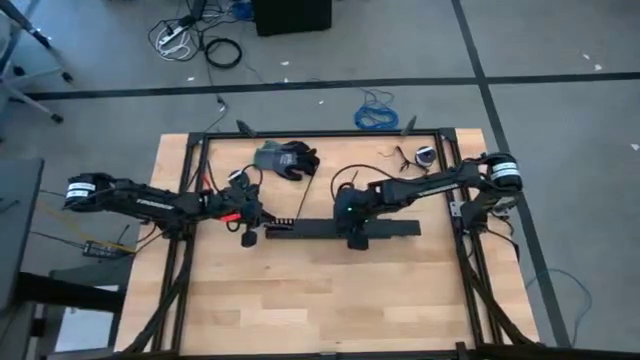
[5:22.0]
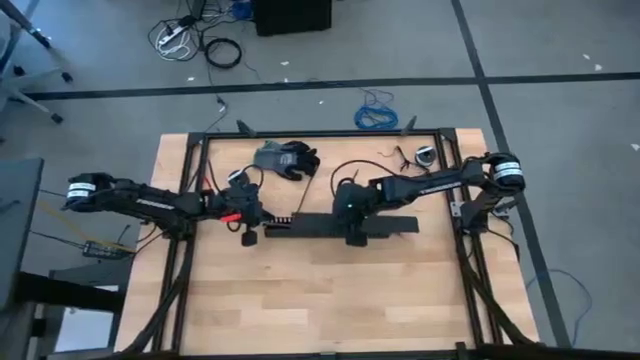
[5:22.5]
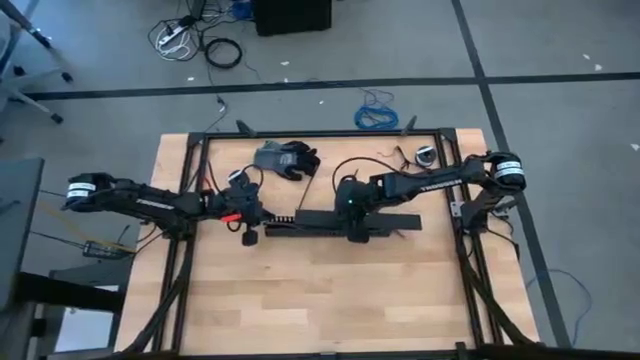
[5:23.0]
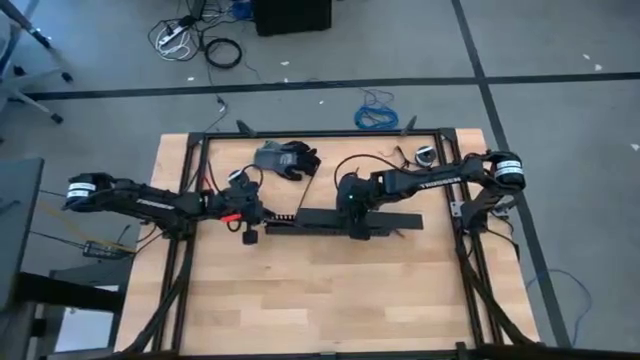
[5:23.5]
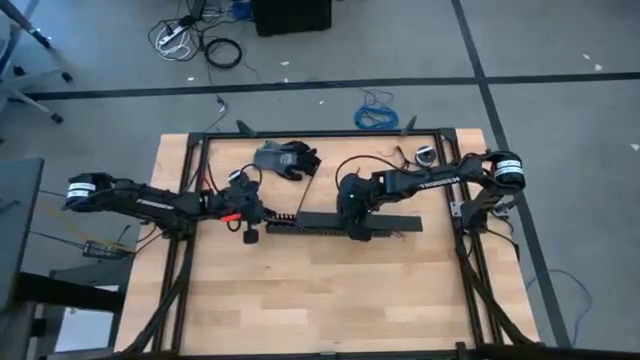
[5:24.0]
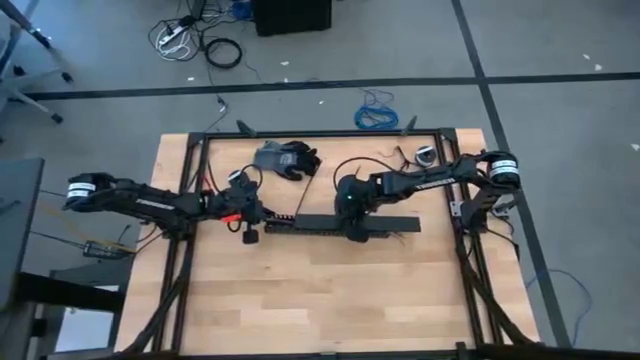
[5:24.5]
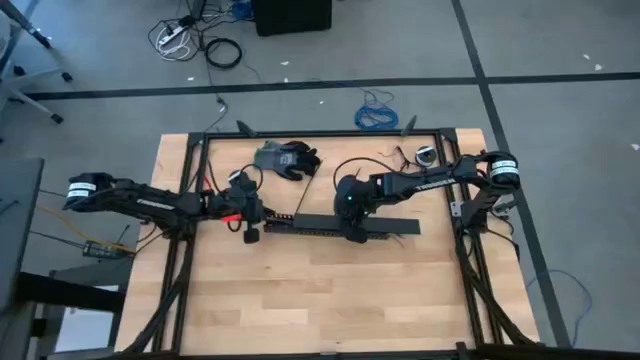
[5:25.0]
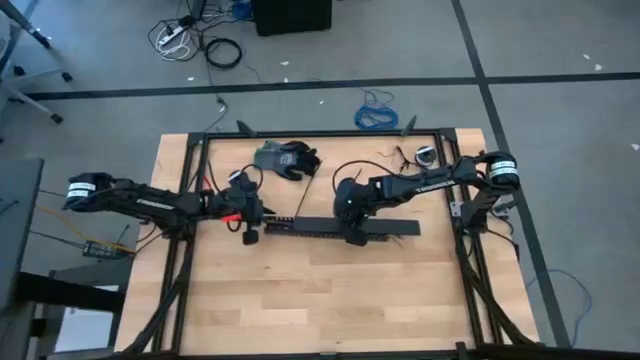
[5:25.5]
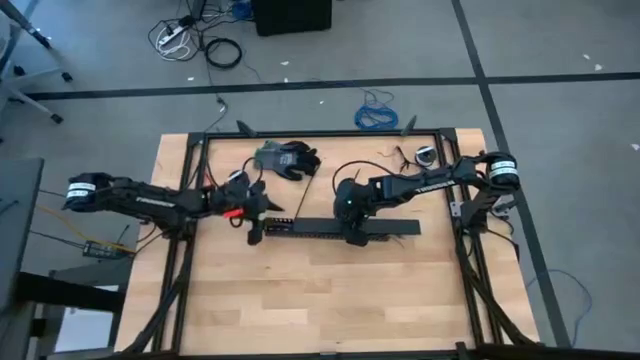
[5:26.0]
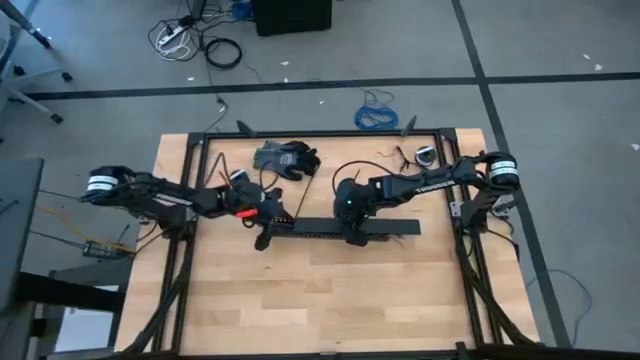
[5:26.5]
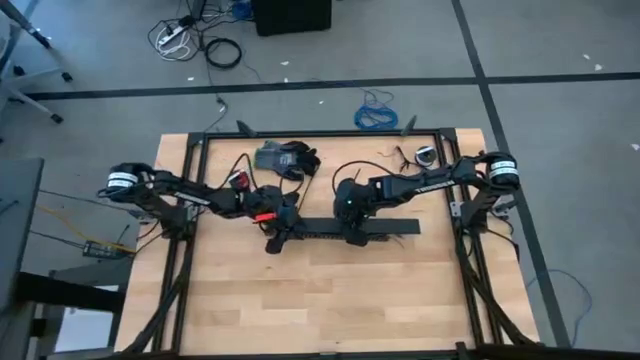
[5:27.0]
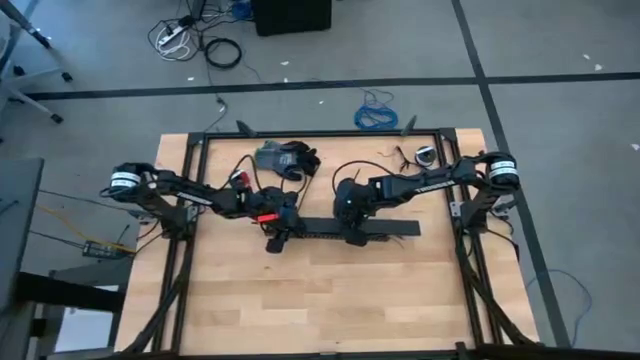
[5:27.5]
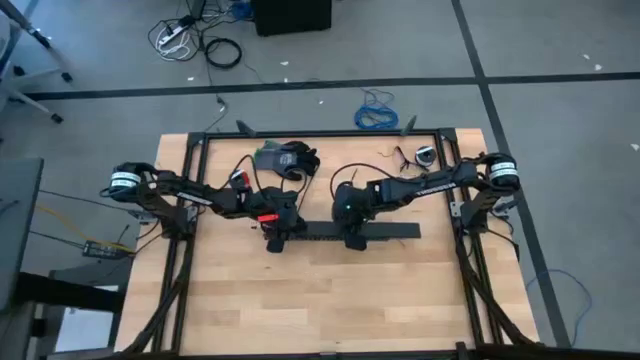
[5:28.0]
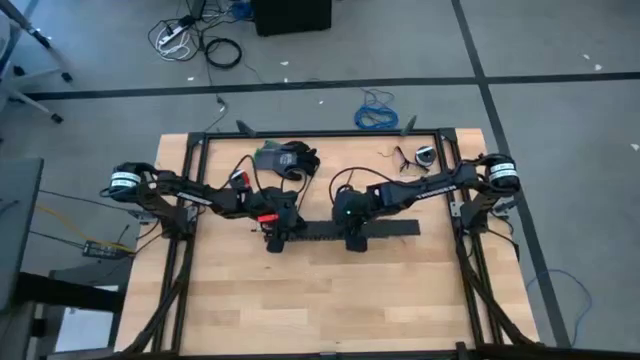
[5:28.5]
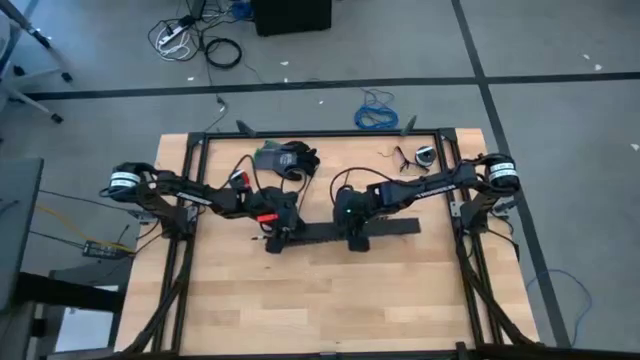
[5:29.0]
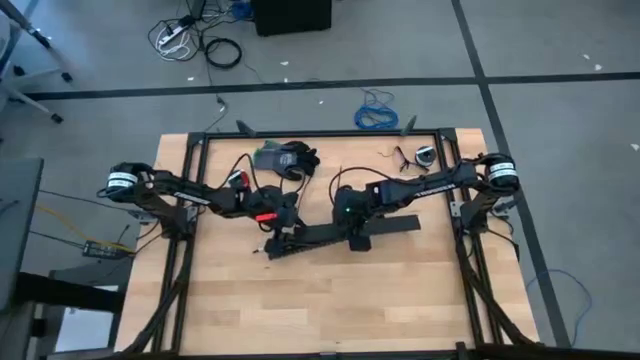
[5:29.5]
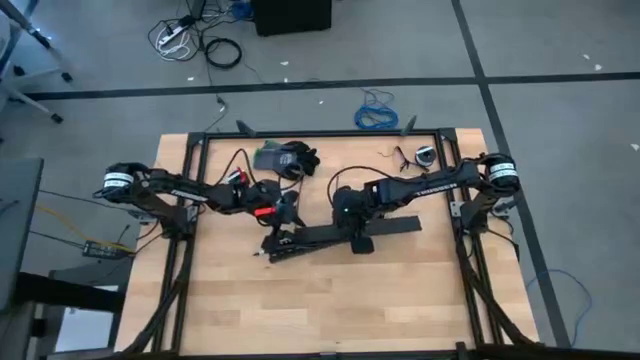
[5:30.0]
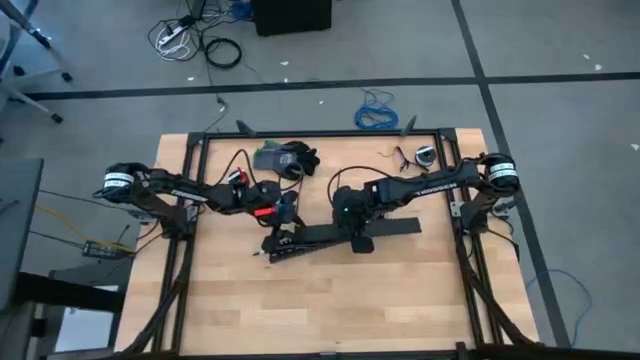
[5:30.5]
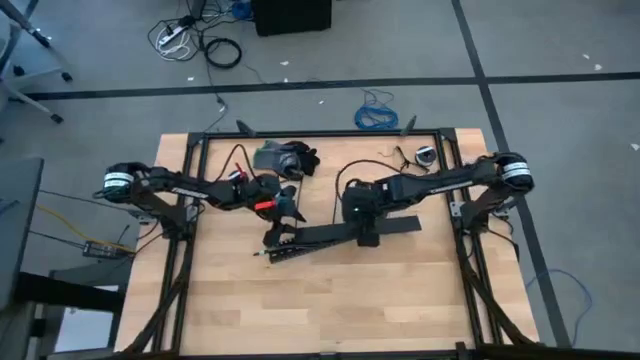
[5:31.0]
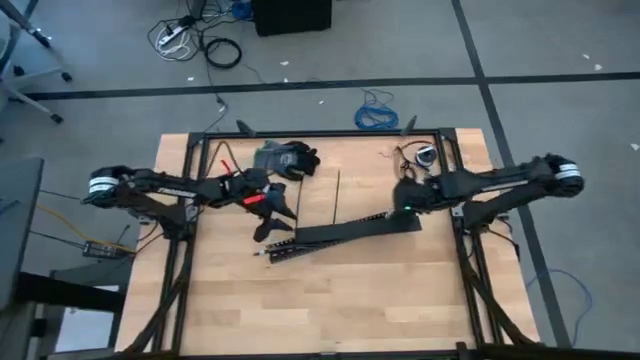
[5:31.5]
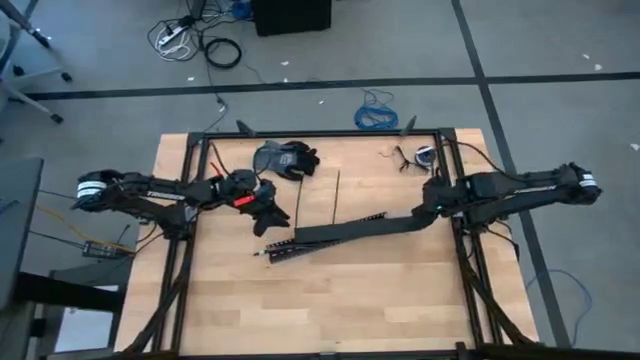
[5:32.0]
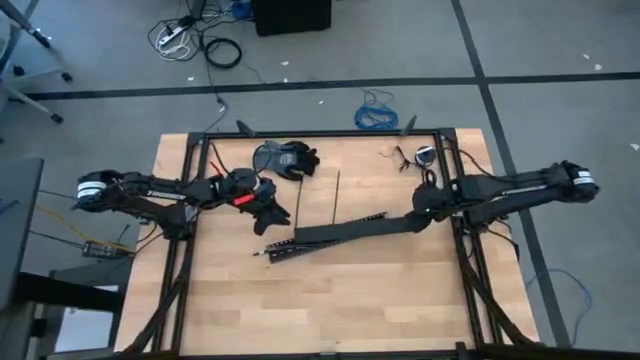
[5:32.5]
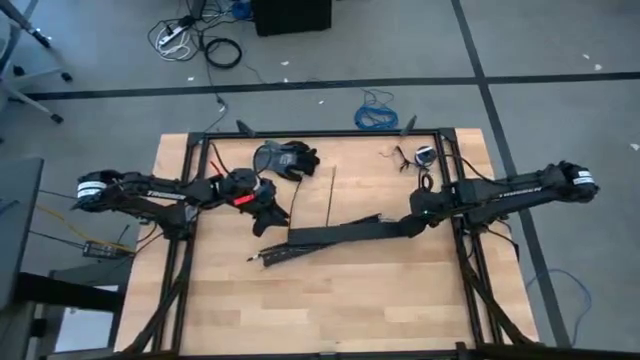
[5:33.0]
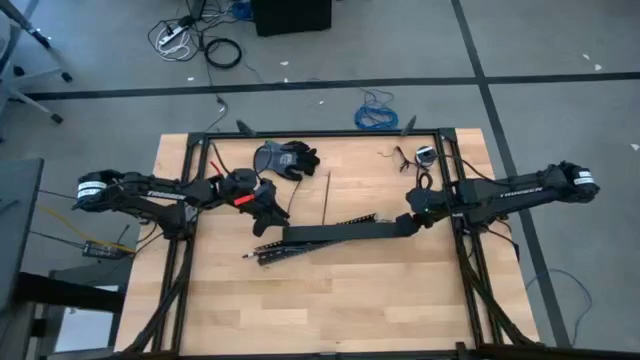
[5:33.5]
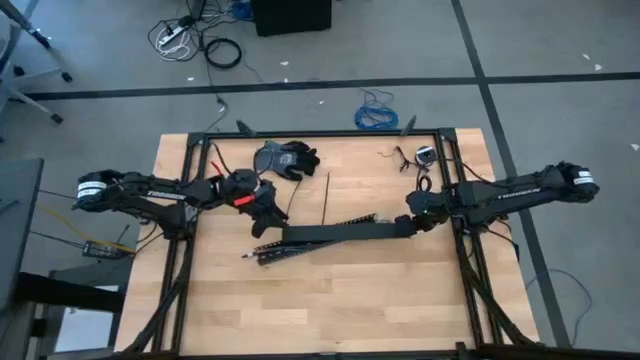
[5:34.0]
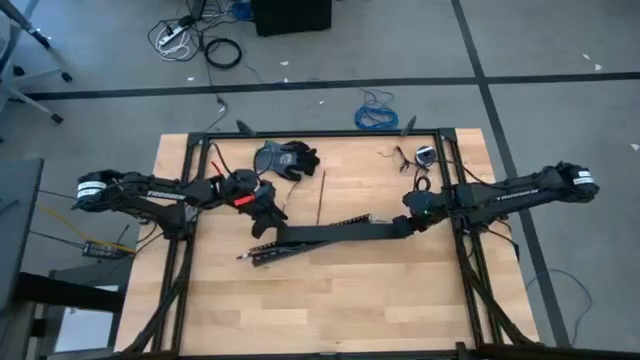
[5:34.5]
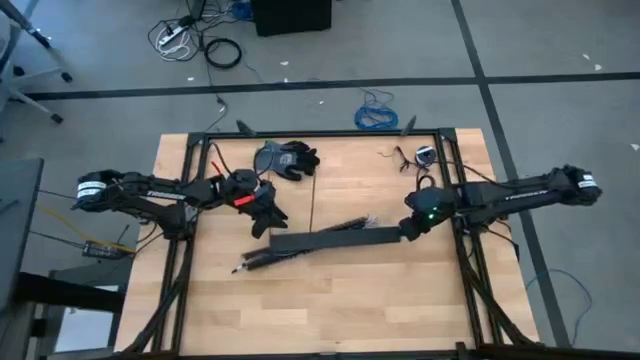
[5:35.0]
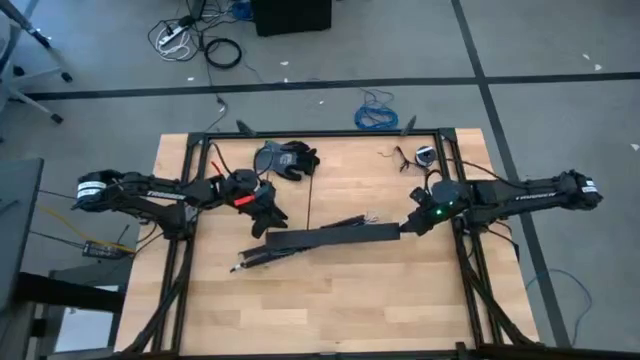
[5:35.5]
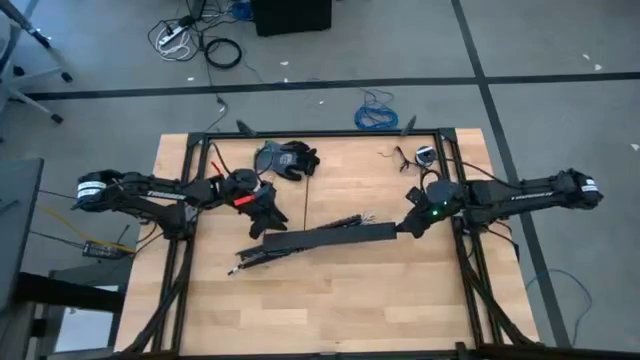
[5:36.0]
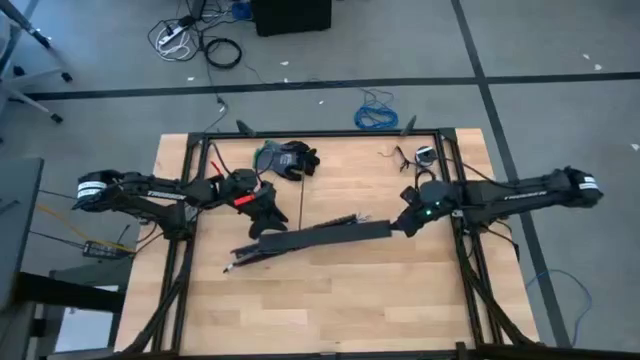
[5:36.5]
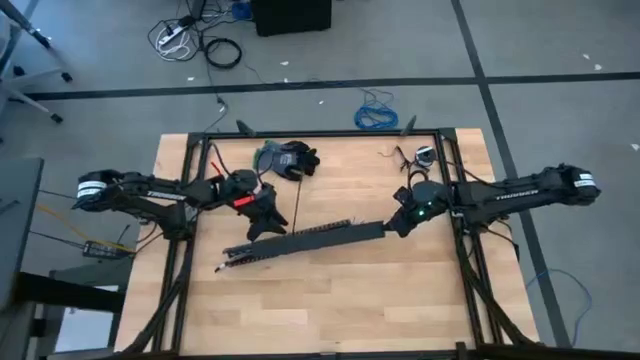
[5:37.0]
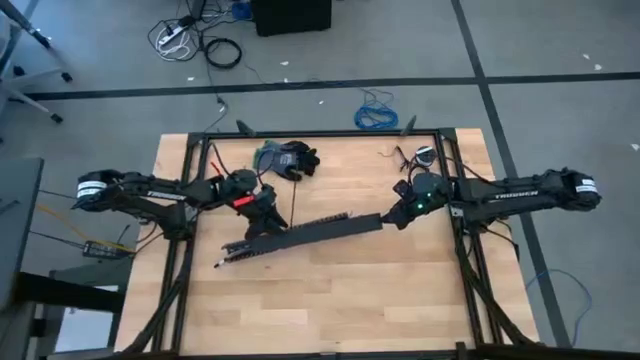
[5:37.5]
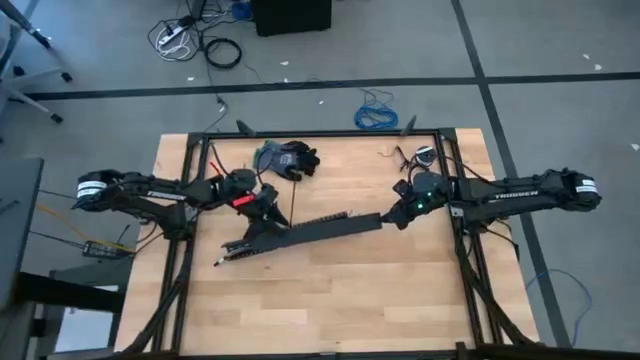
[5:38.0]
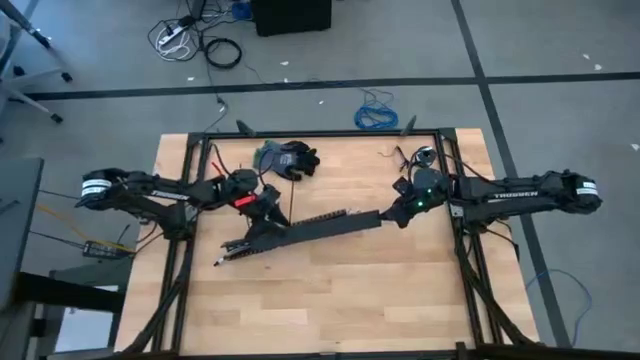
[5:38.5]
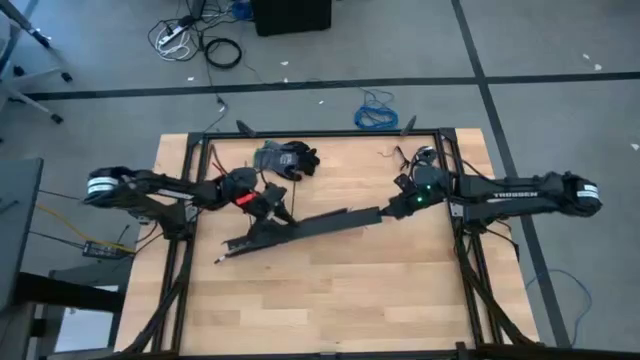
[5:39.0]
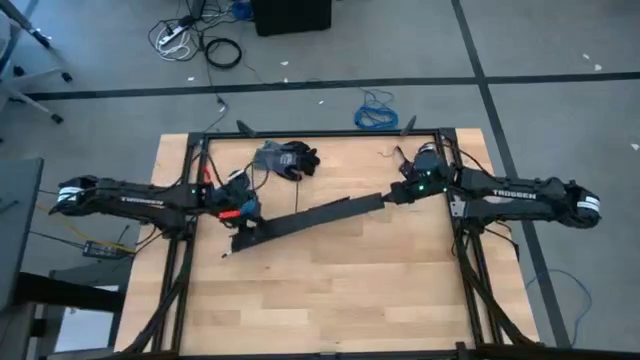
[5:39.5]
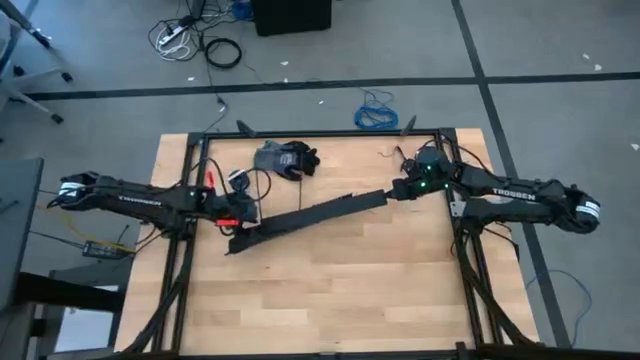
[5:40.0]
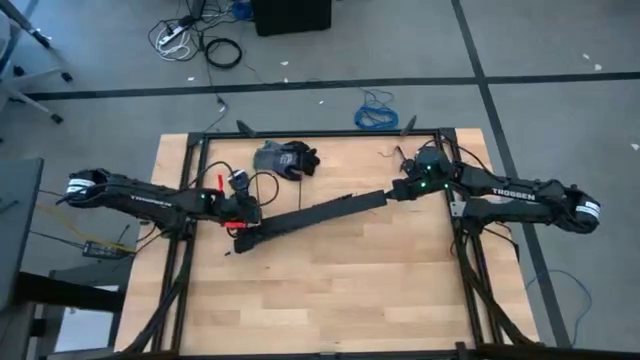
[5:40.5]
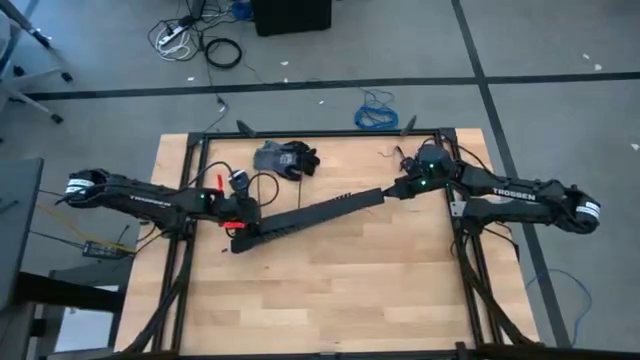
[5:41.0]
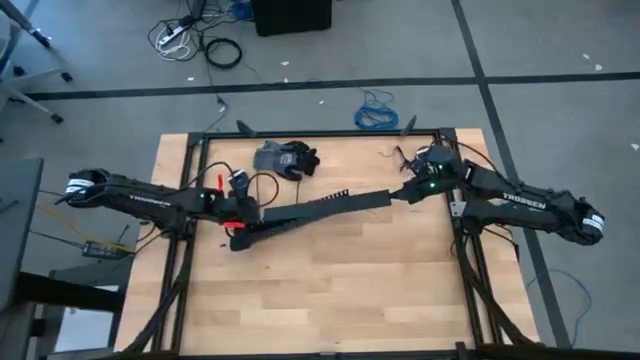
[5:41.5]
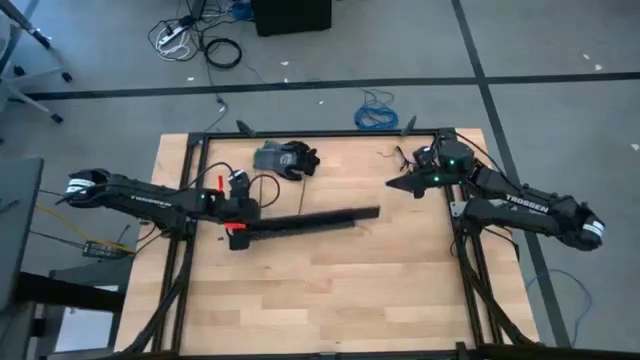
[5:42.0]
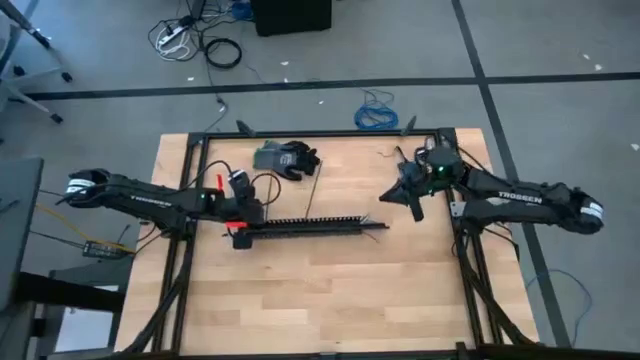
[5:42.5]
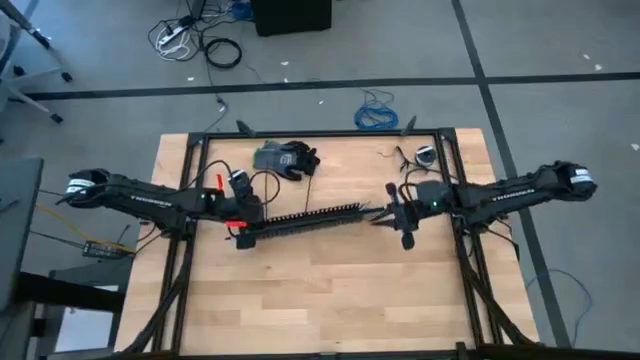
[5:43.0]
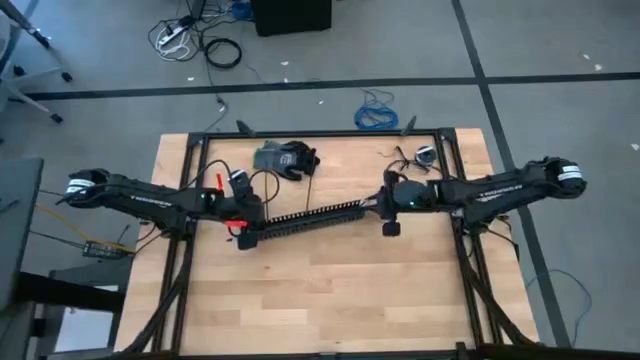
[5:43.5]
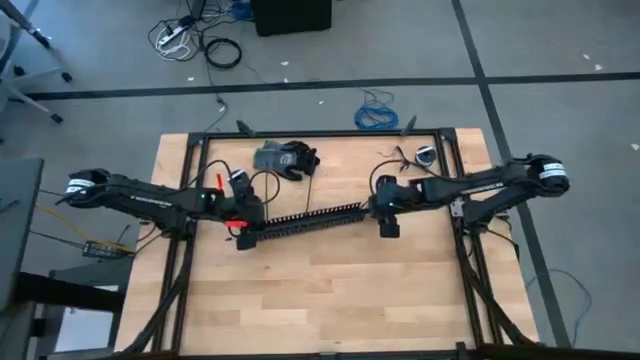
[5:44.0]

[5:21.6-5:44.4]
Task: Ziptie cables
Close the black cable duct cover
